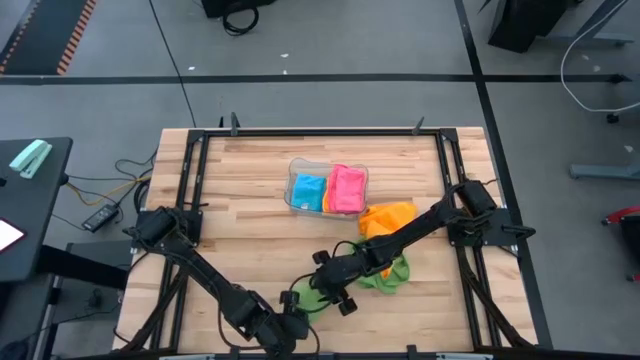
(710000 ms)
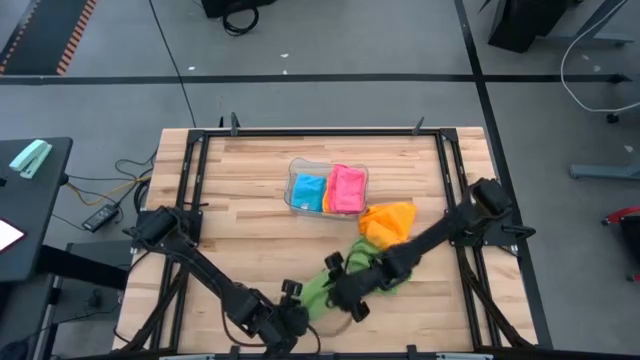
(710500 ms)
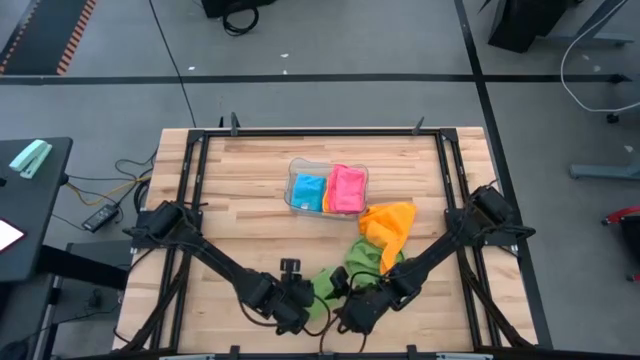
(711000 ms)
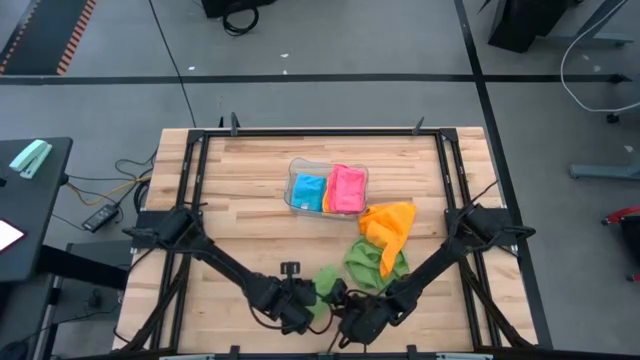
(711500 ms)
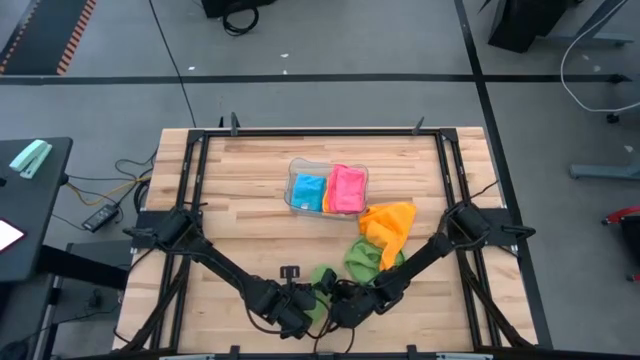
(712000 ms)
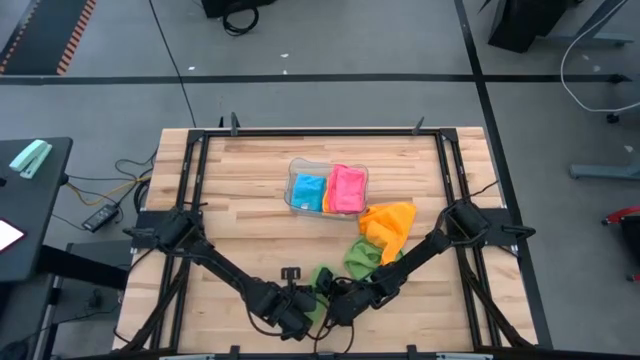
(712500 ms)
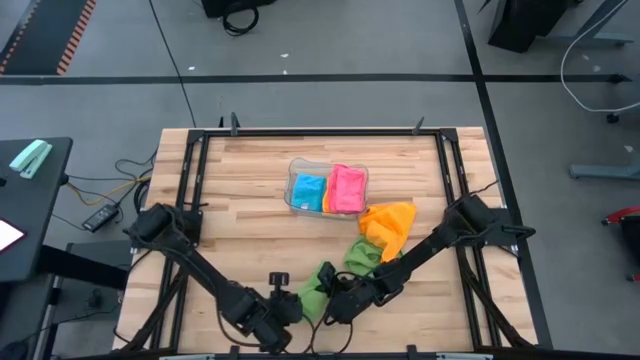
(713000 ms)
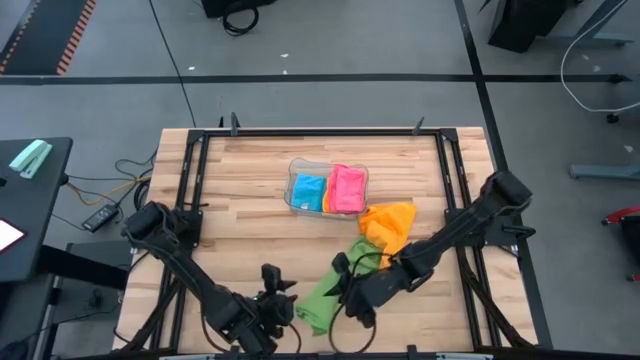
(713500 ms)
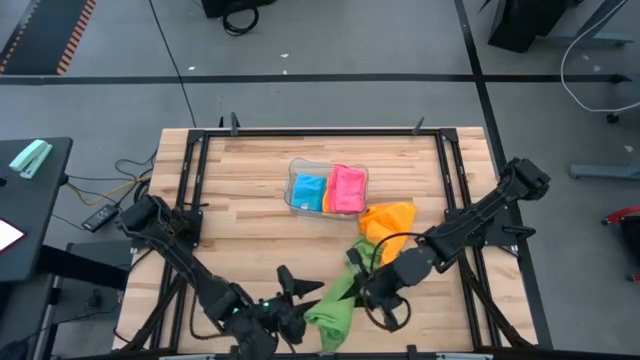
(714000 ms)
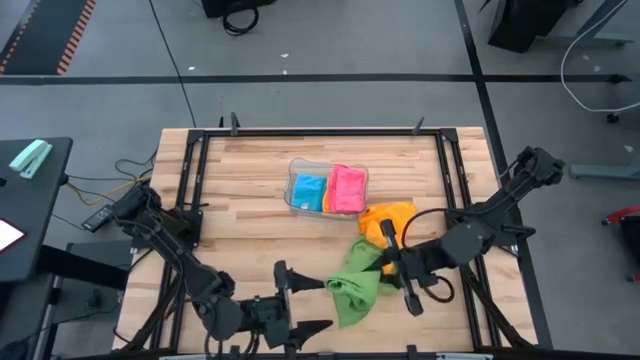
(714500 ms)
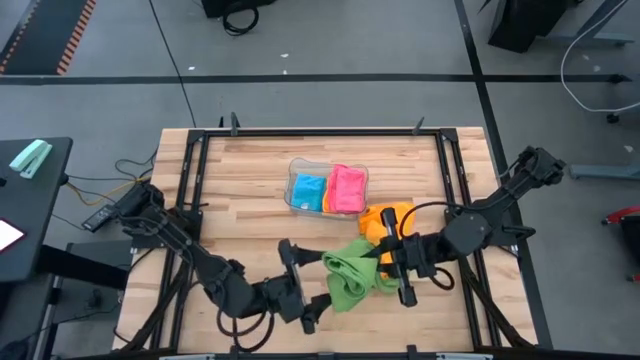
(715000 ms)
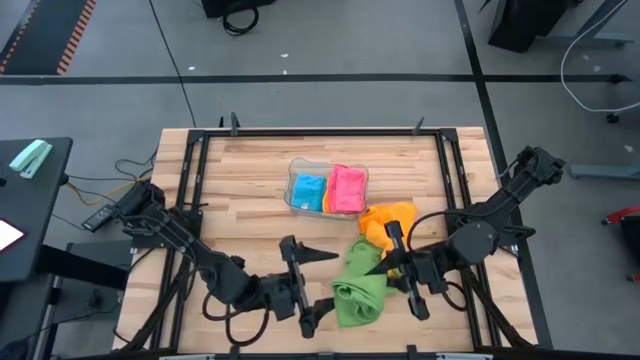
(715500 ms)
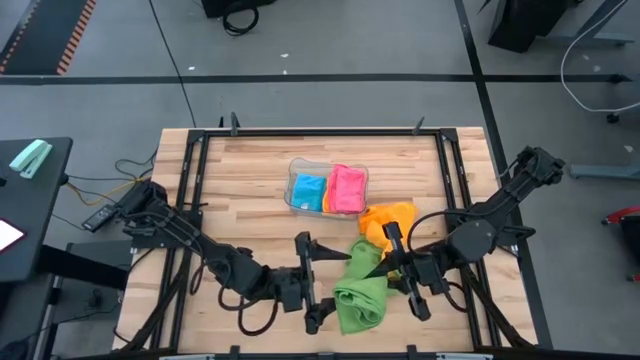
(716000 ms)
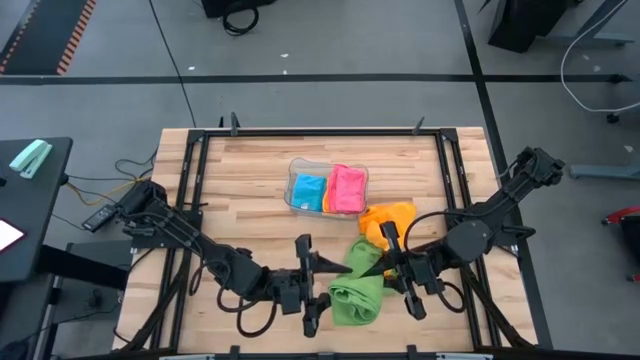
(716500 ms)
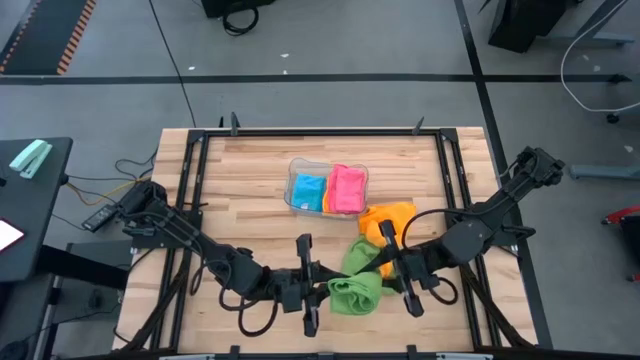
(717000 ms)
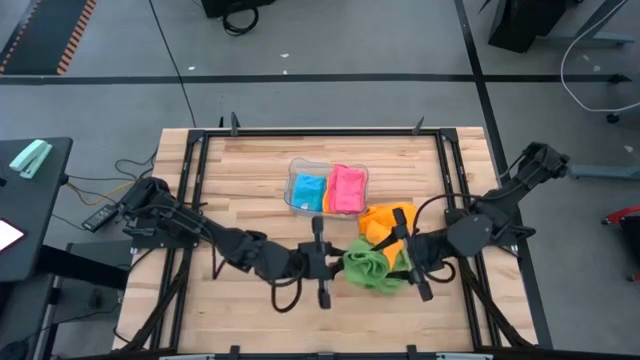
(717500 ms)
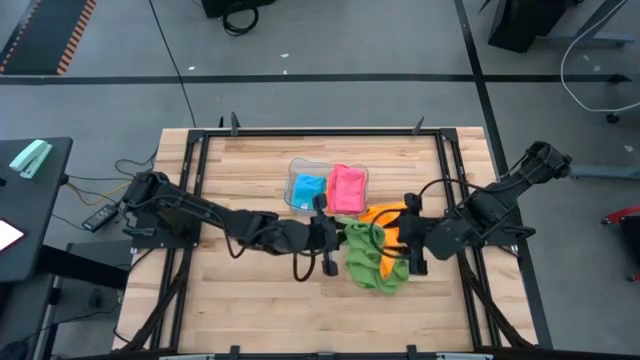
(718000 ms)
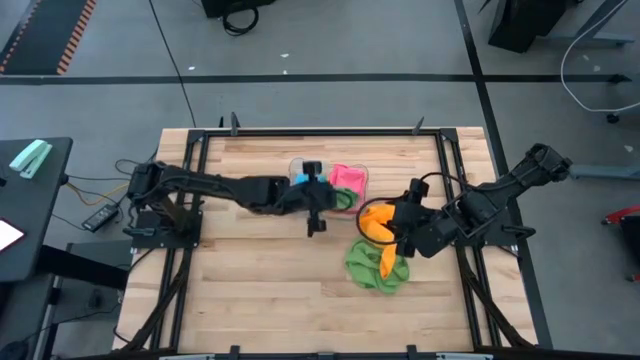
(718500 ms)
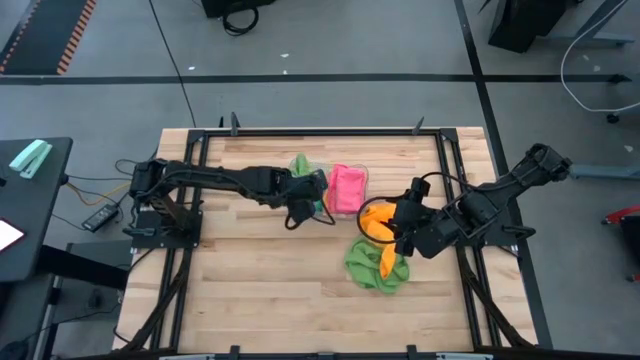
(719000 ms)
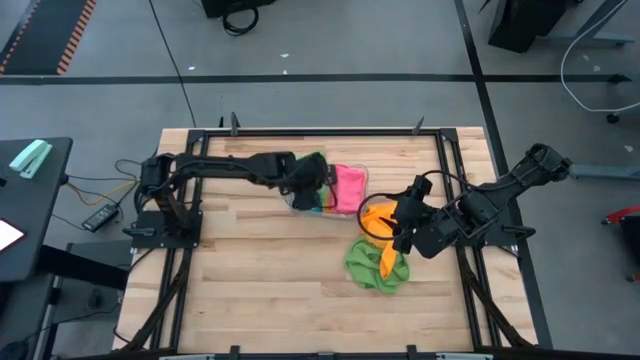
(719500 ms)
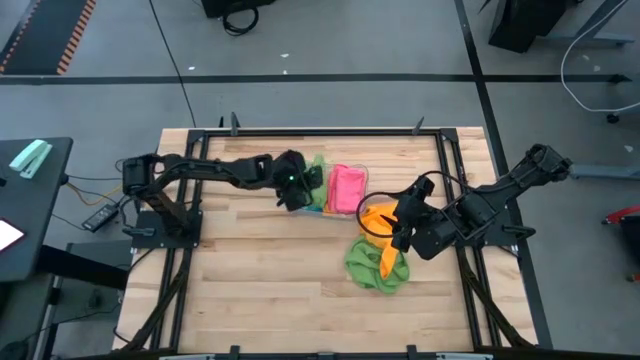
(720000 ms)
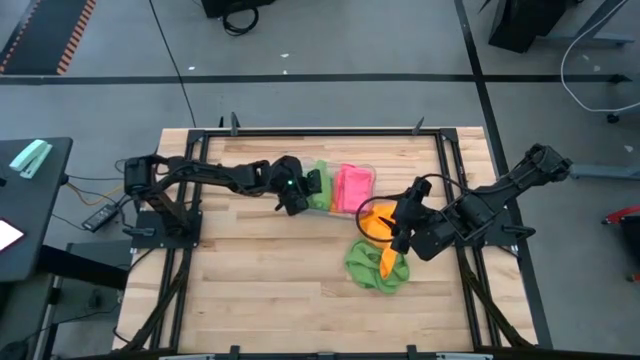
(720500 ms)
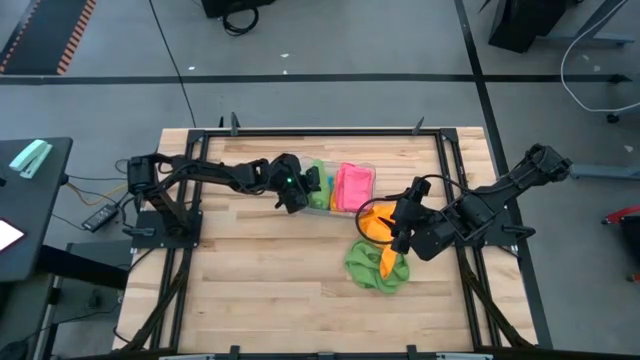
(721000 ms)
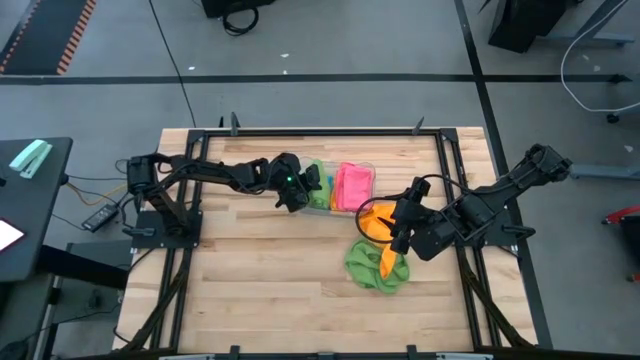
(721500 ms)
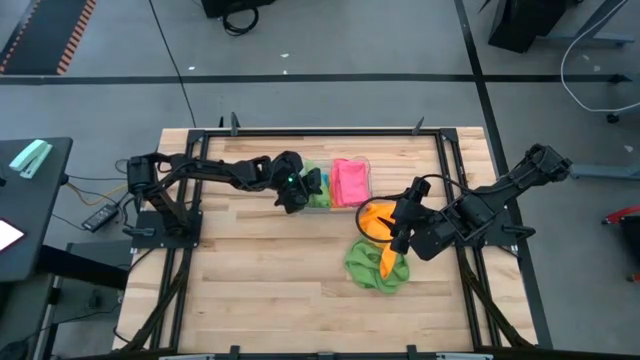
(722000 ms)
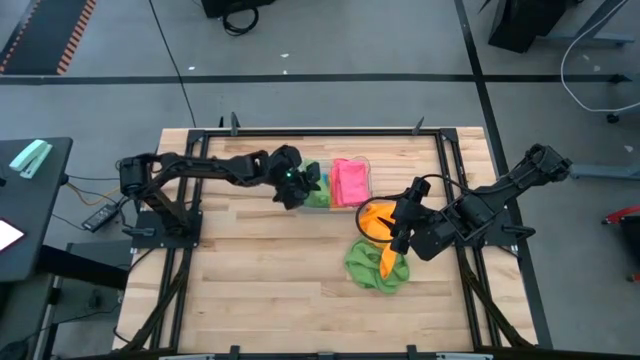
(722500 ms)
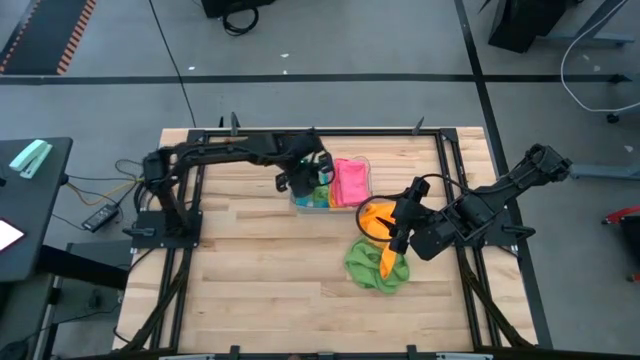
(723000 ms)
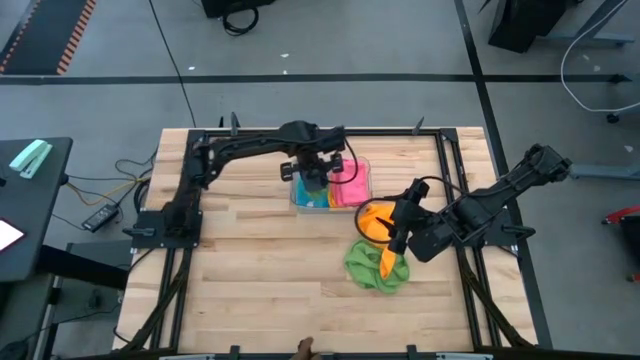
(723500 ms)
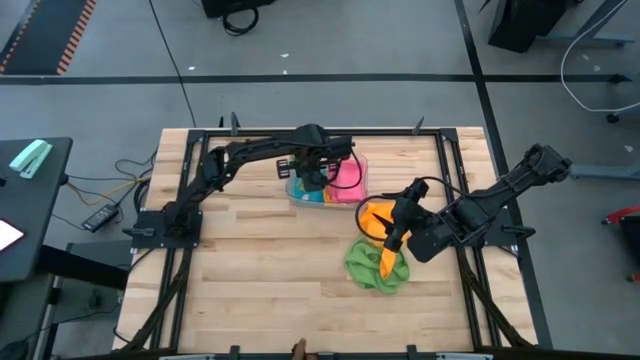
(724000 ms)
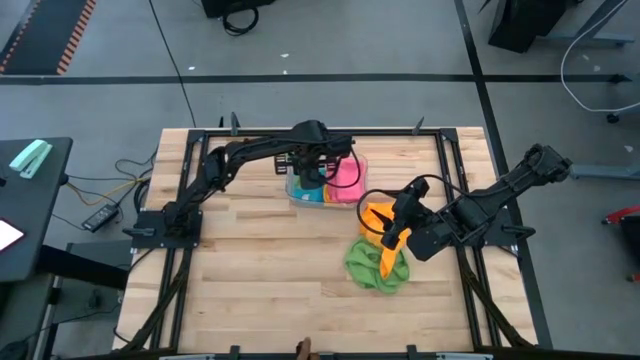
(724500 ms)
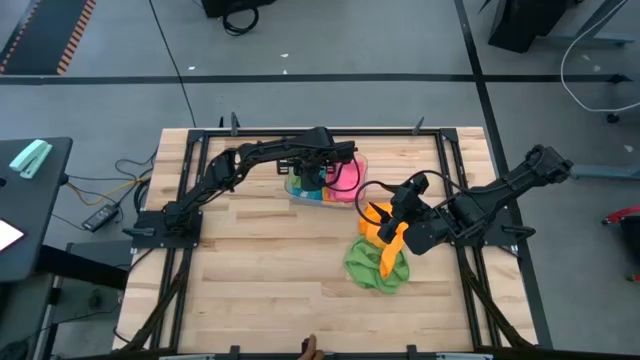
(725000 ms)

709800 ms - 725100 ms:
Task: Fold microfiber towels
Put the folded green microfiber cloth into the transparent bin

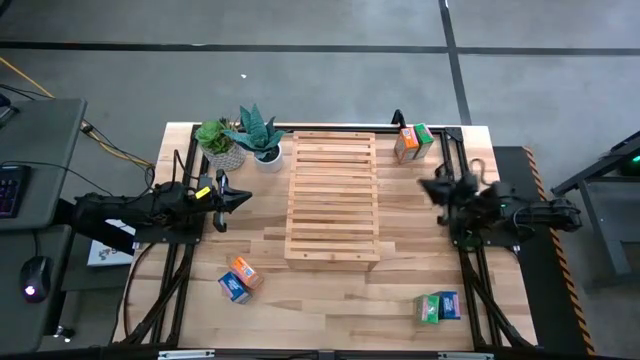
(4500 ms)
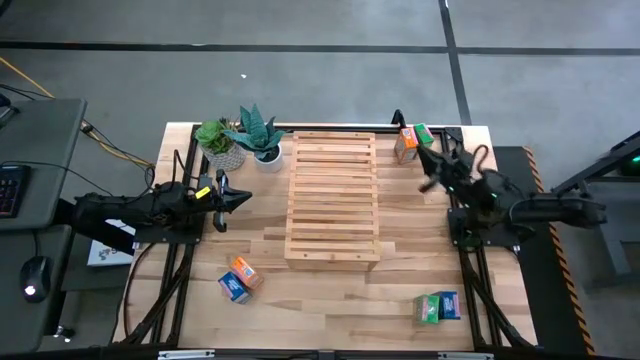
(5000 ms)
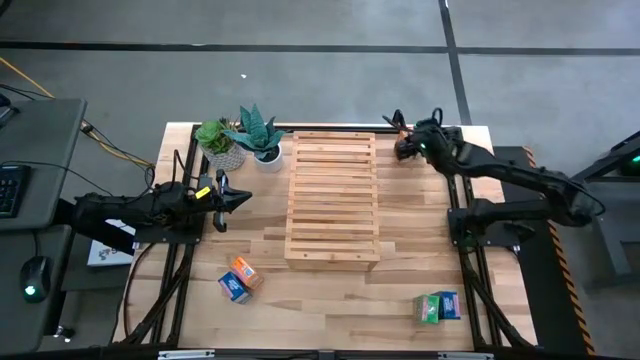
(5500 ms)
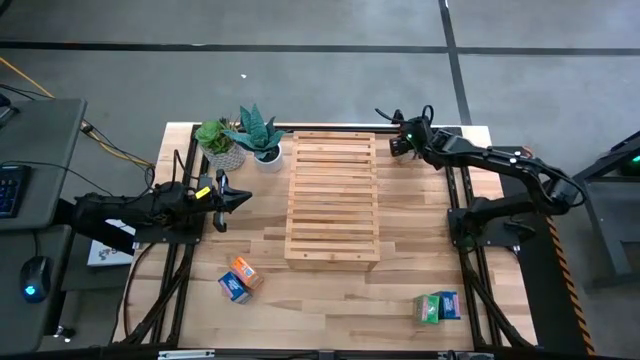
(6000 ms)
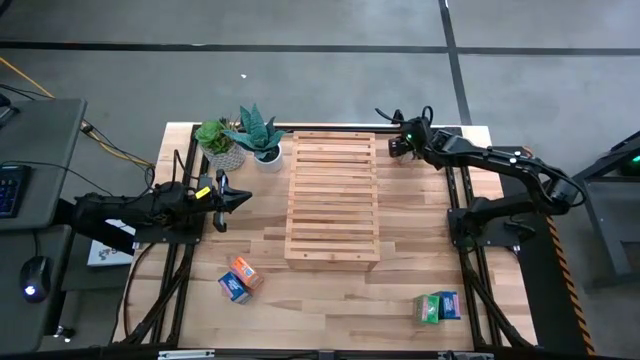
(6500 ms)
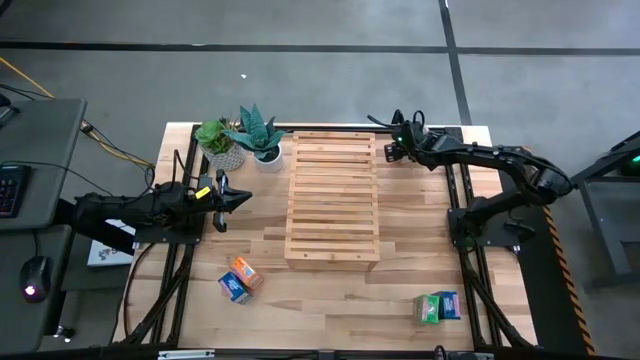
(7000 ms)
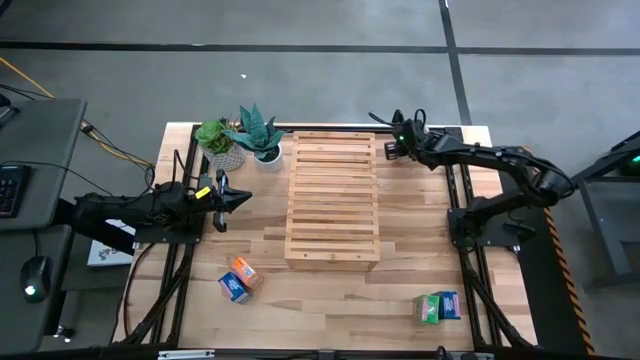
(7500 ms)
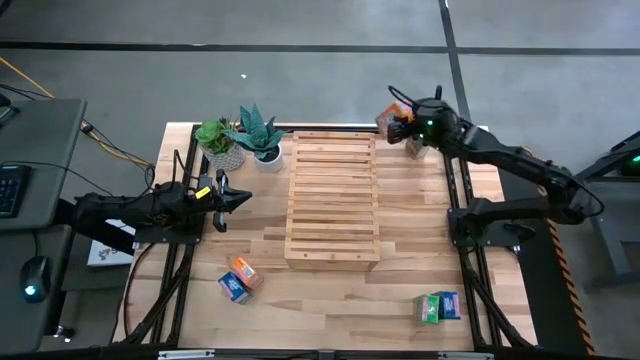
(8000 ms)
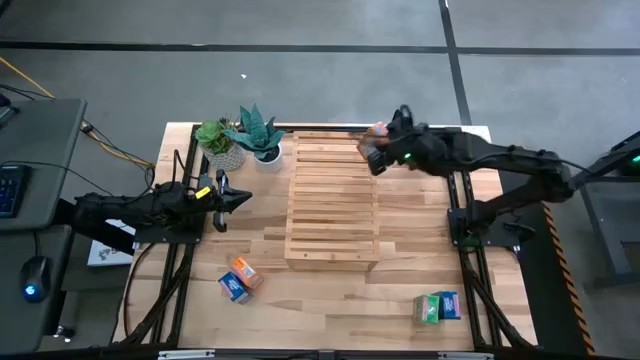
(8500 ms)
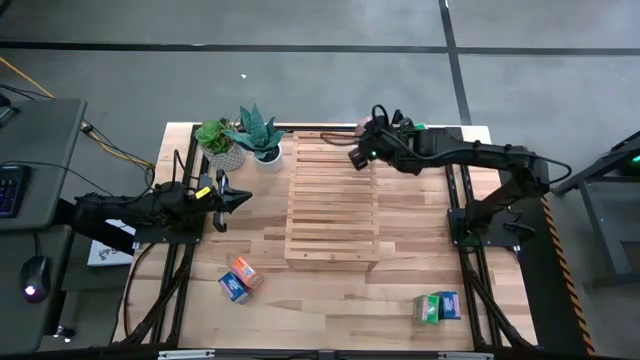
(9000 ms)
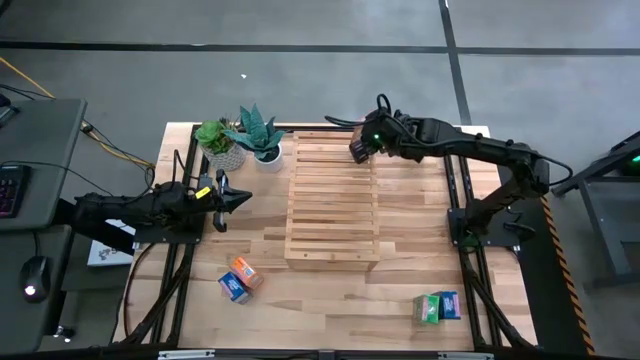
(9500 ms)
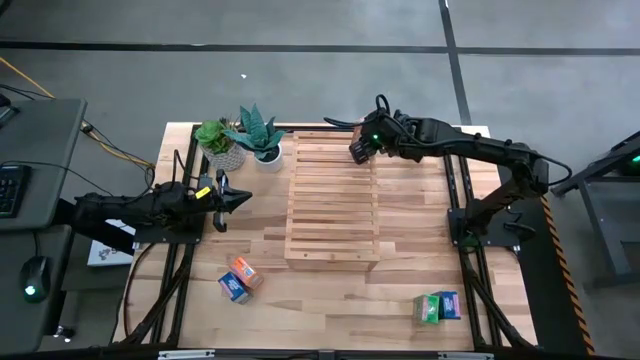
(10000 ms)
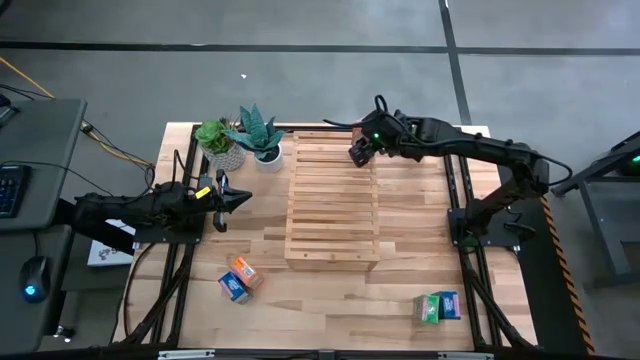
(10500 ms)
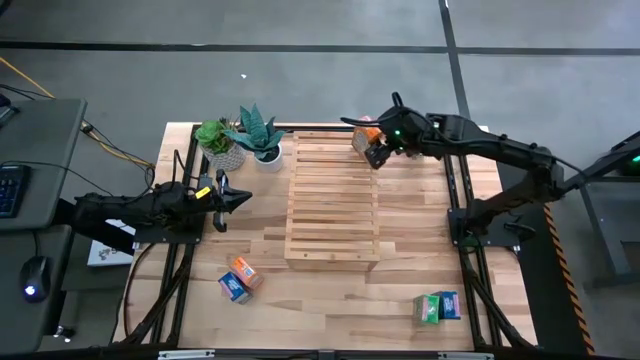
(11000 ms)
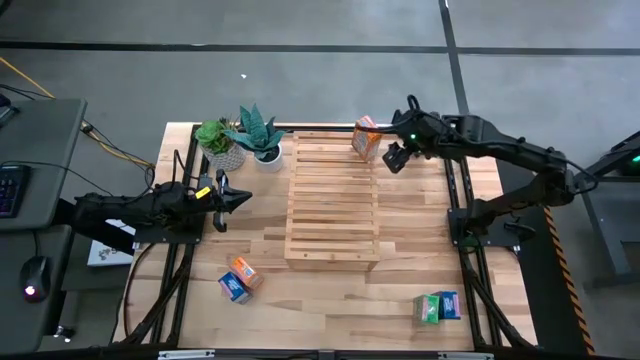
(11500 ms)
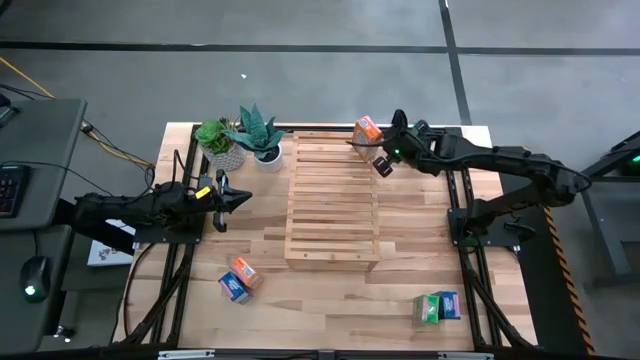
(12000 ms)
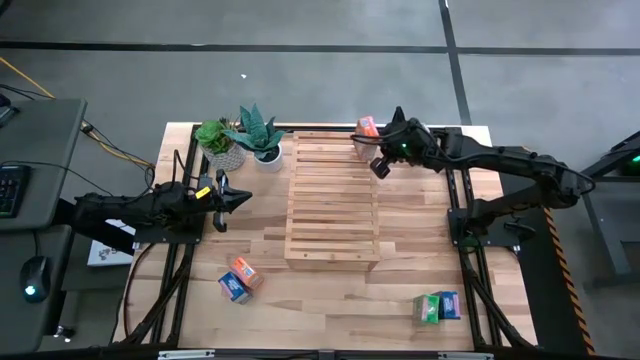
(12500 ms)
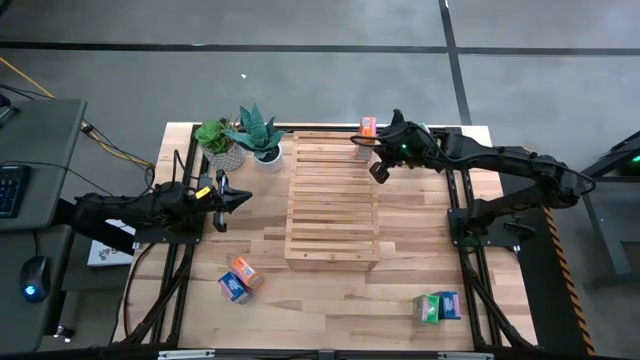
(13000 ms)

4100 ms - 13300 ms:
Task: Stack cereal on shelf
Put the top right orange cereal box on the shelf
